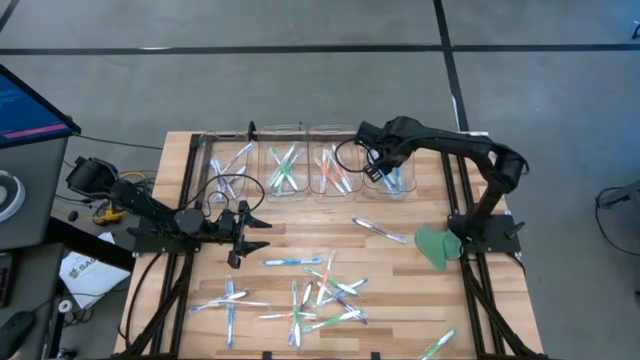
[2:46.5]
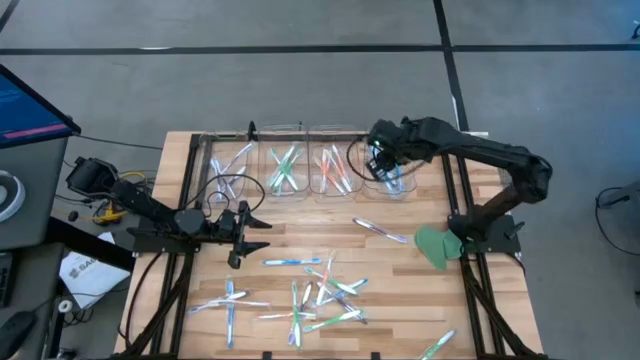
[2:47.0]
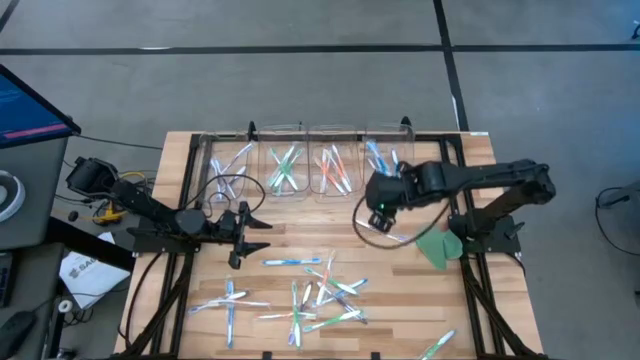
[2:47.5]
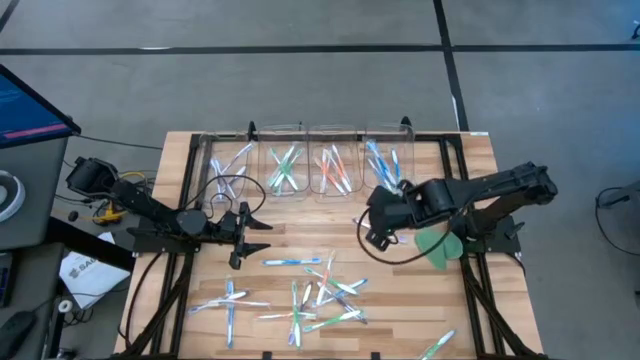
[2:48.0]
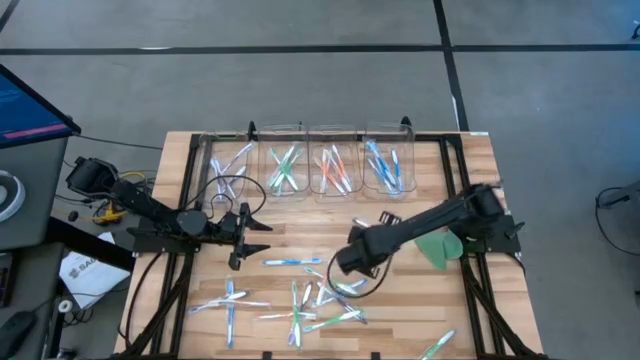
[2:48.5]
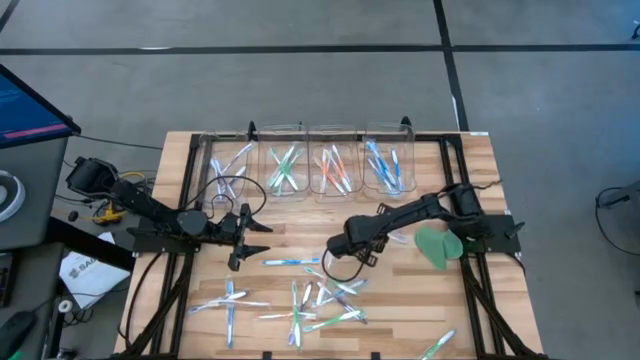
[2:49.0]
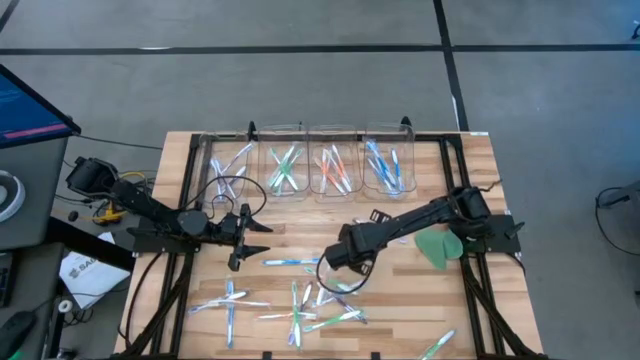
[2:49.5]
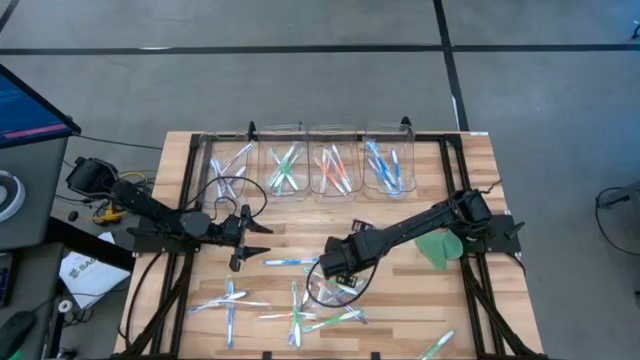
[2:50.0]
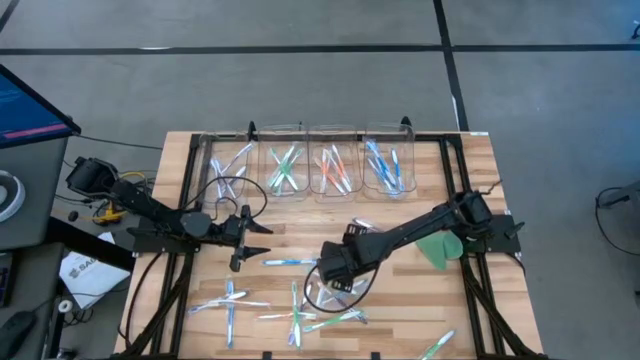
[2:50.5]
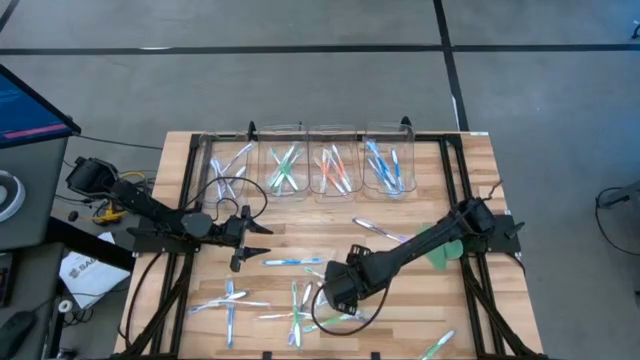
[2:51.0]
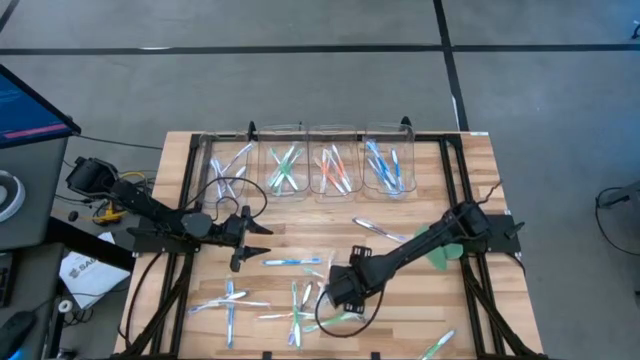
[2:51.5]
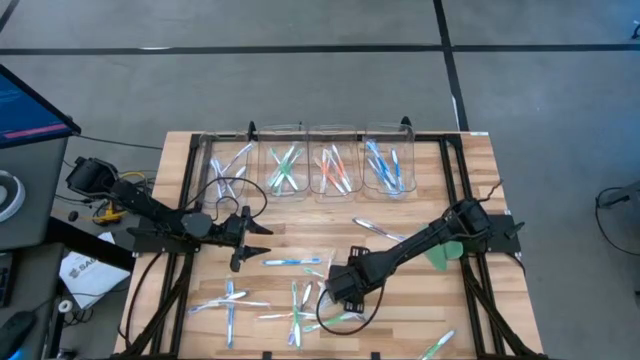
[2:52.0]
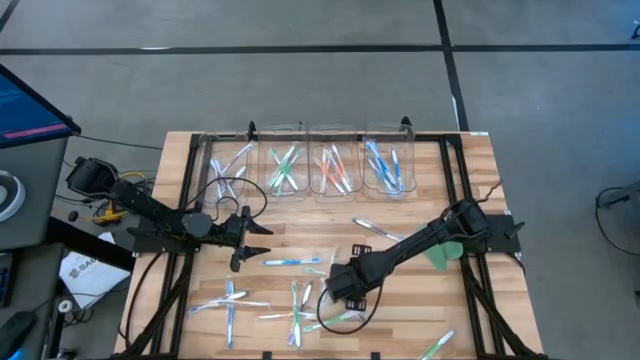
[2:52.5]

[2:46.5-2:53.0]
Task: Pick & Place Toothbrushes
Put the green toothbrush into the middle left transparent bin

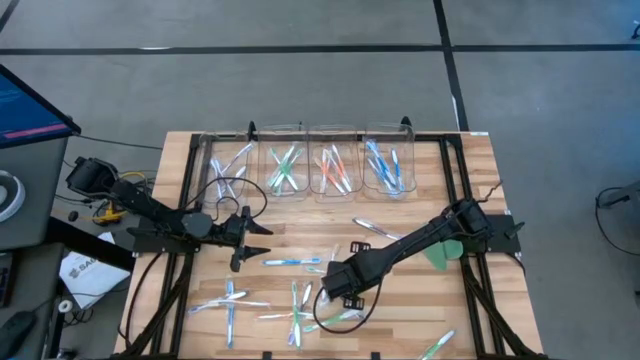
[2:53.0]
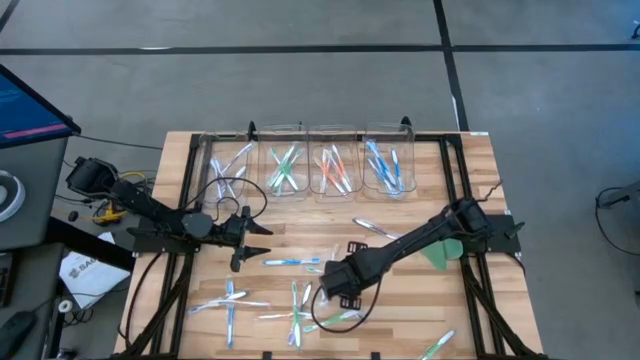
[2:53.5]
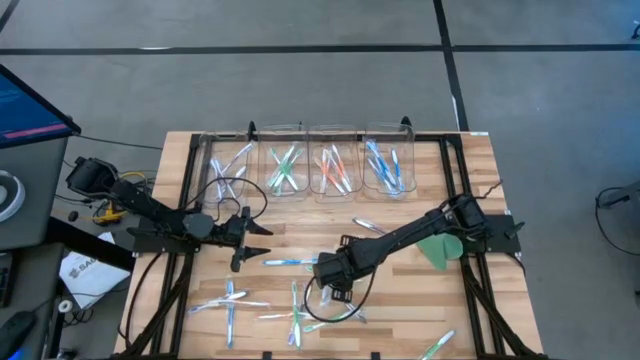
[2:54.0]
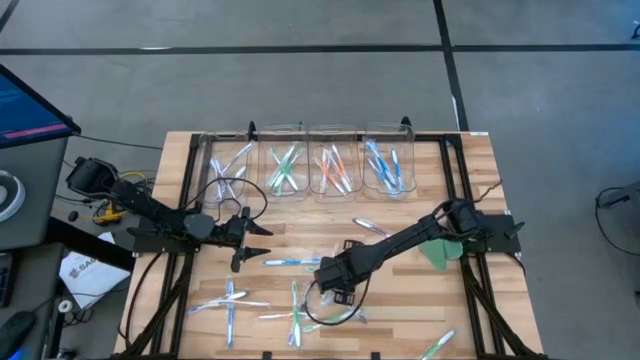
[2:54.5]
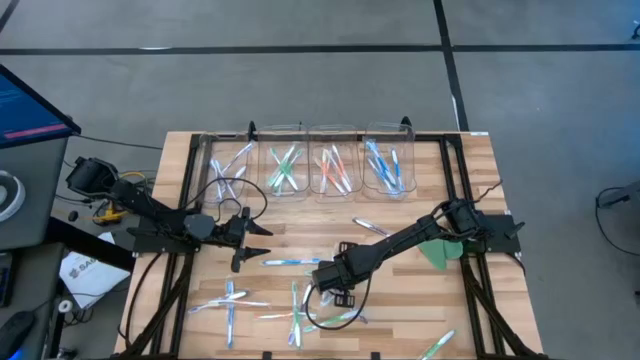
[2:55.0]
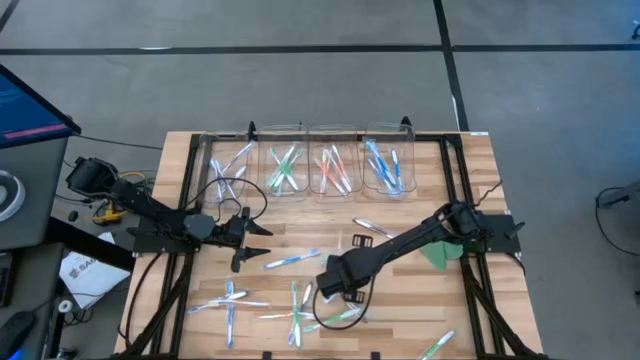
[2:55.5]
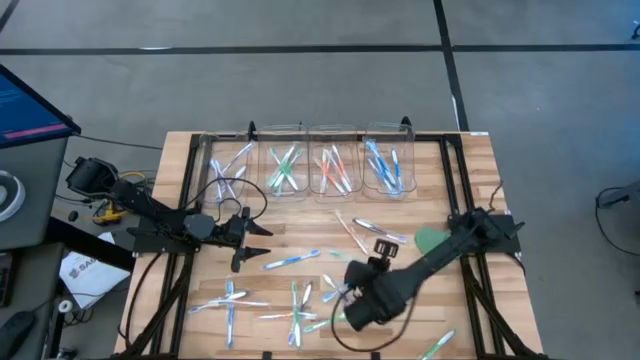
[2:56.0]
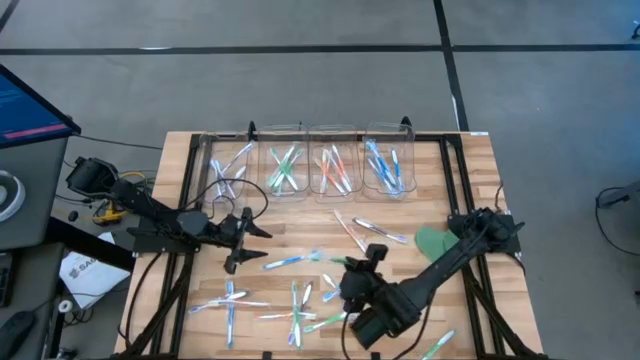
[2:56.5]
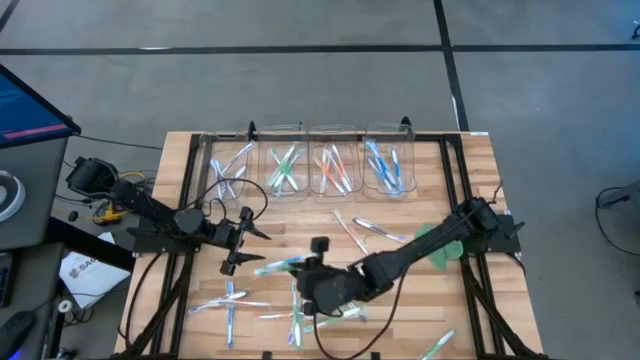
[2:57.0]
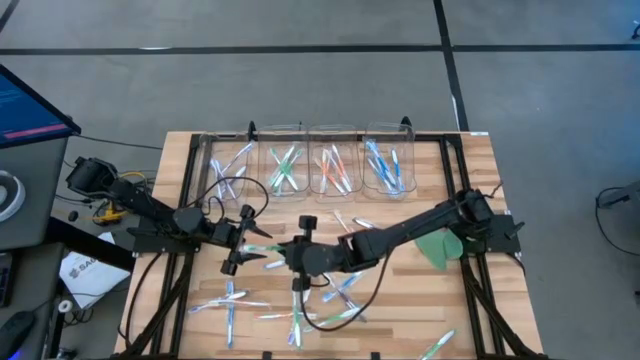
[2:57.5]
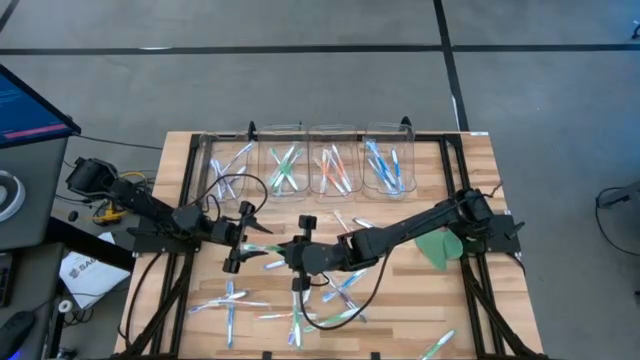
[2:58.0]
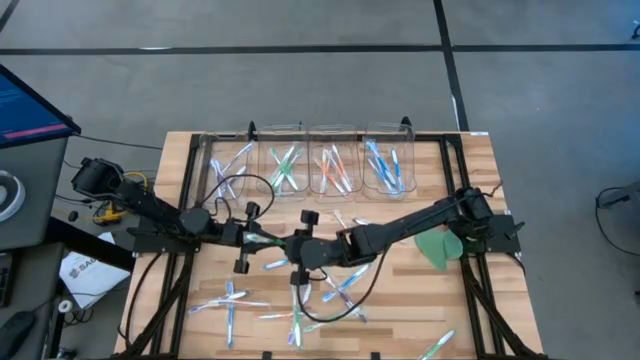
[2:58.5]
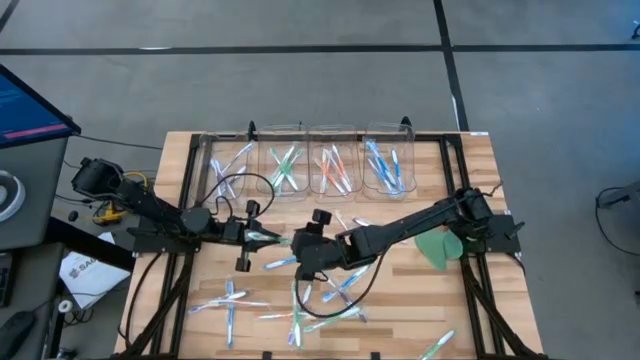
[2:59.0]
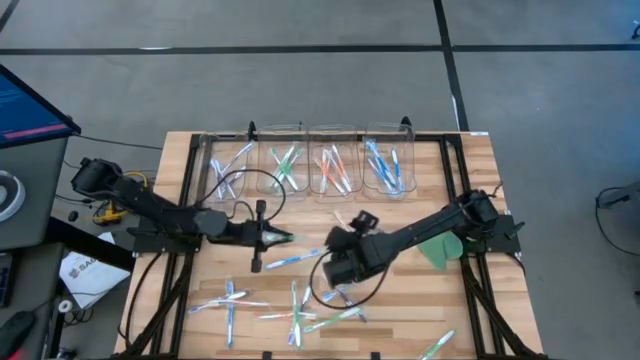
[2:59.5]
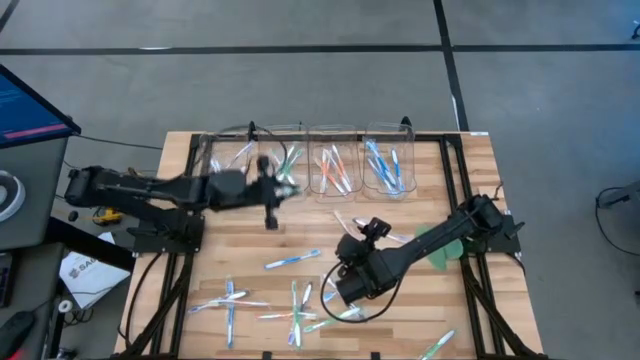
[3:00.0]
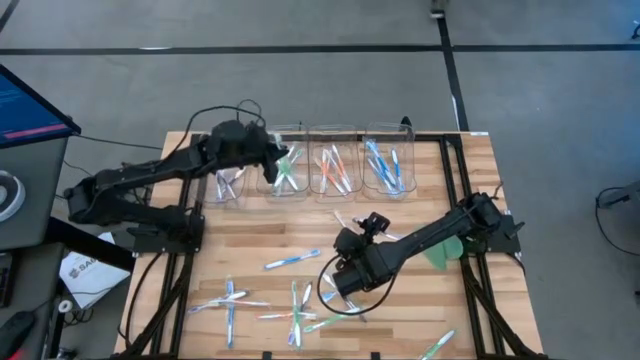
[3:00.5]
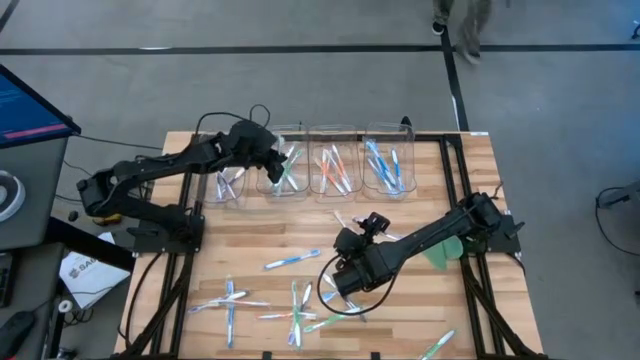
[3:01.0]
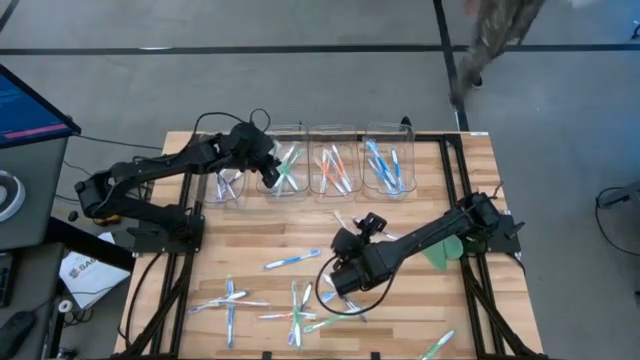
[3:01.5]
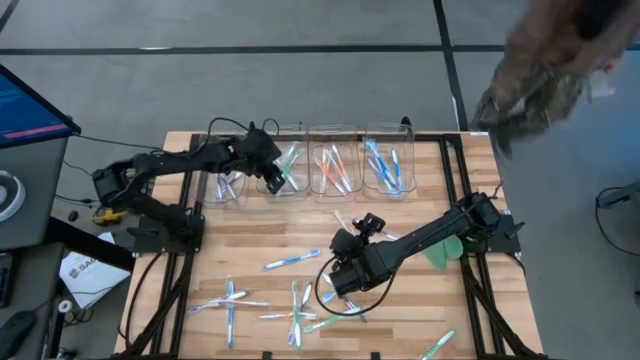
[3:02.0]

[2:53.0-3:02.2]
Put the green toothbrush into the middle left transparent bin

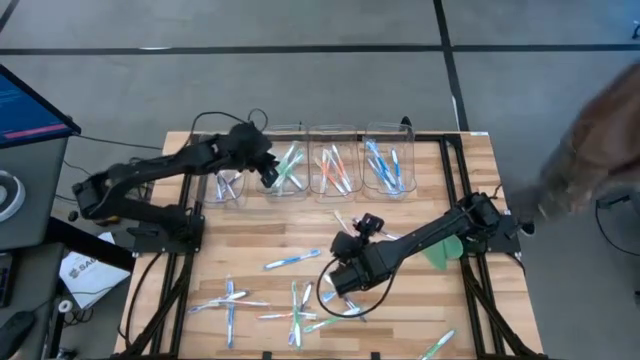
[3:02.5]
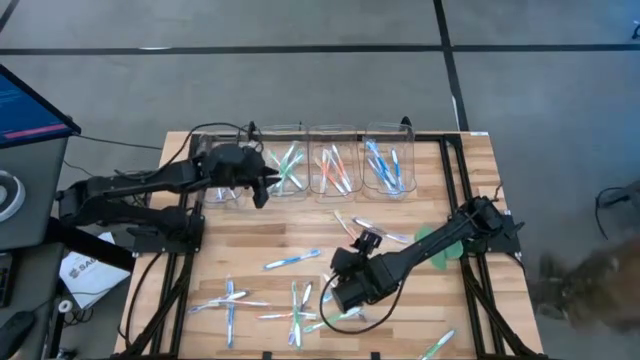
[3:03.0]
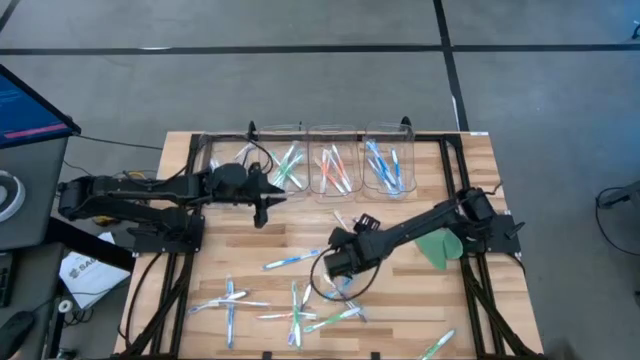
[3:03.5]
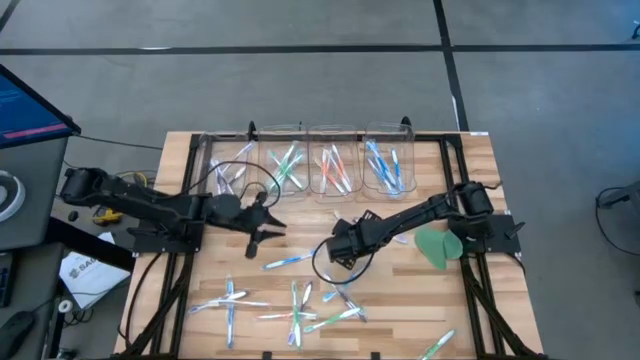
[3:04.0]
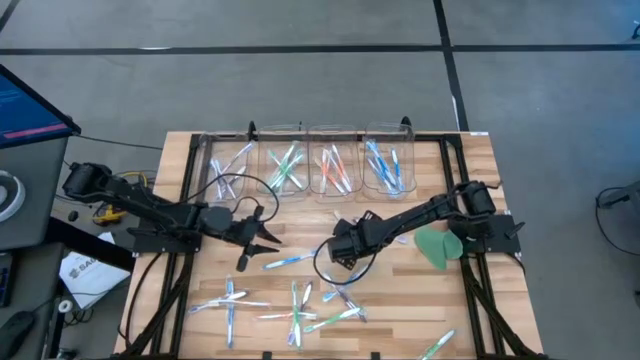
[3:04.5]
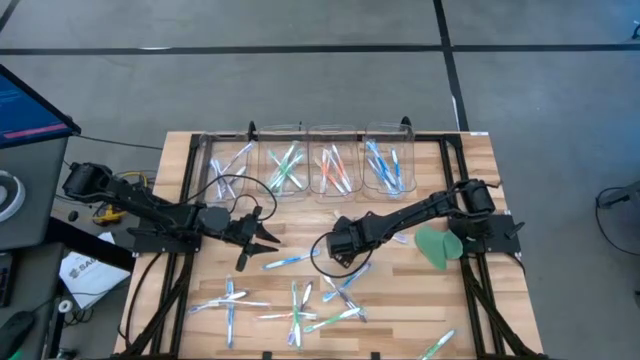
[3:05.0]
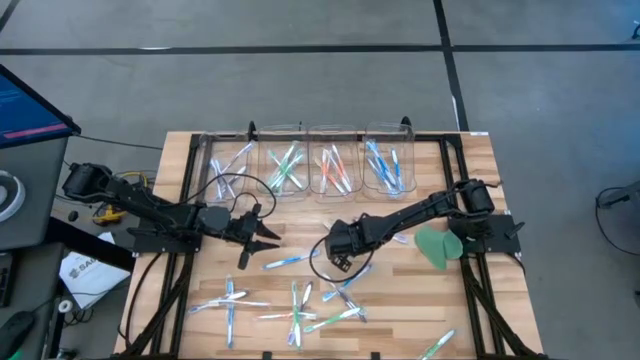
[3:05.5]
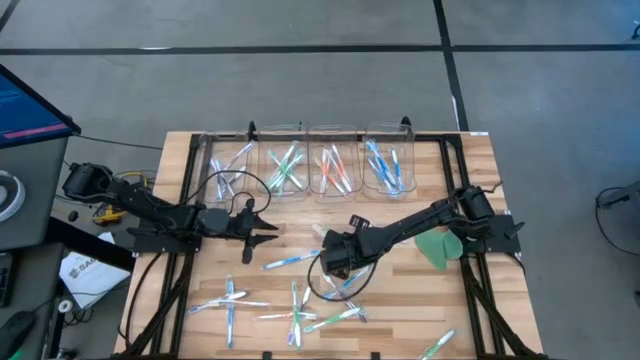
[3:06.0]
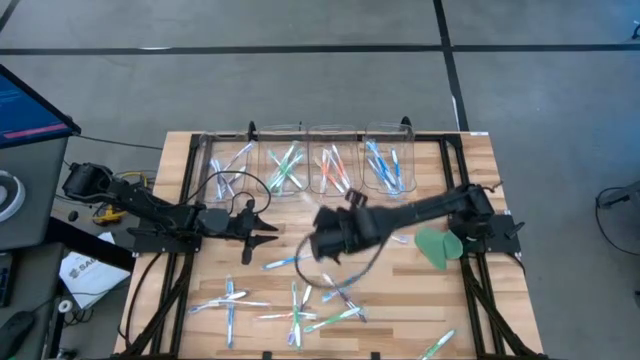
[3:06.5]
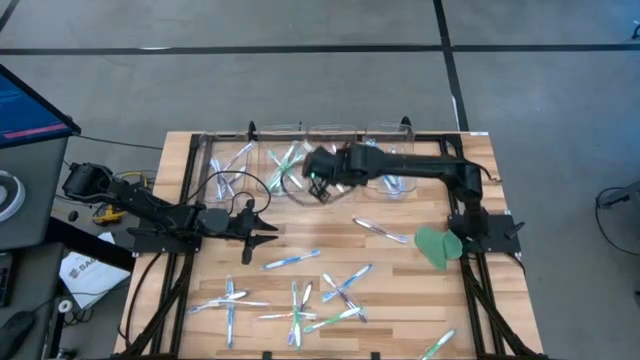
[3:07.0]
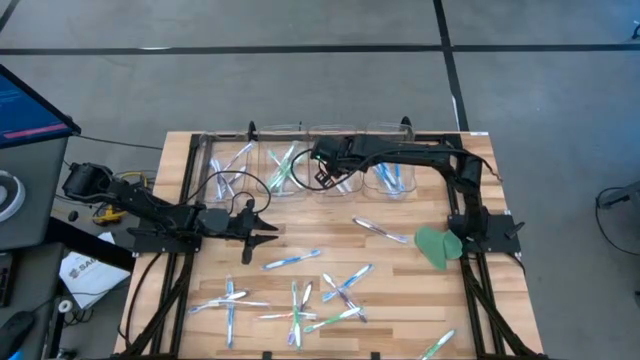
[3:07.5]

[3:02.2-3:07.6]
Put the orange toothbrush into the middle right transparent bin
